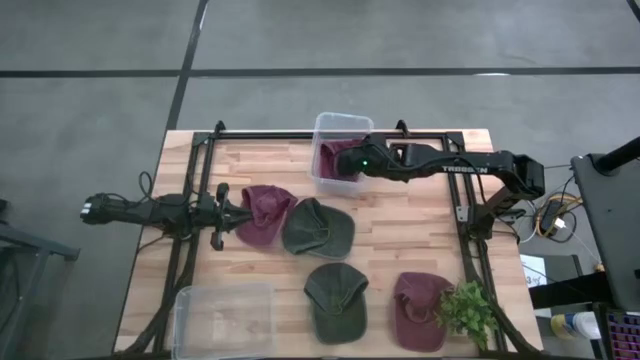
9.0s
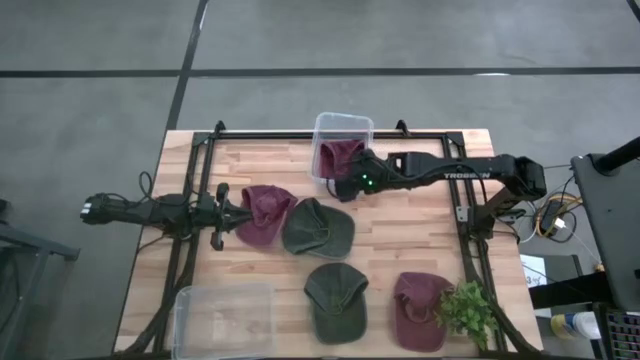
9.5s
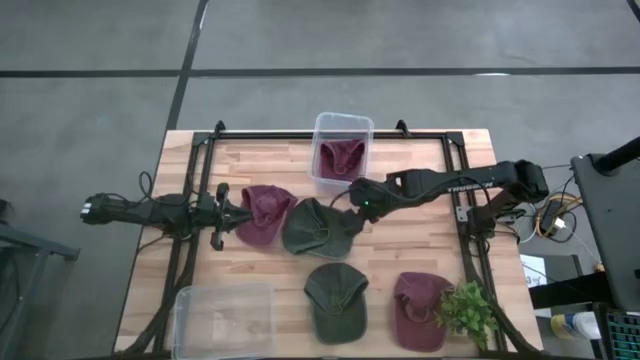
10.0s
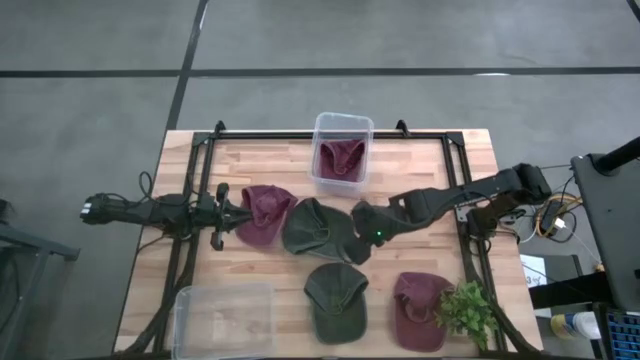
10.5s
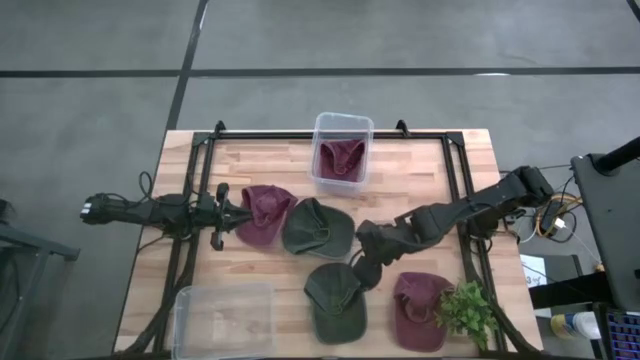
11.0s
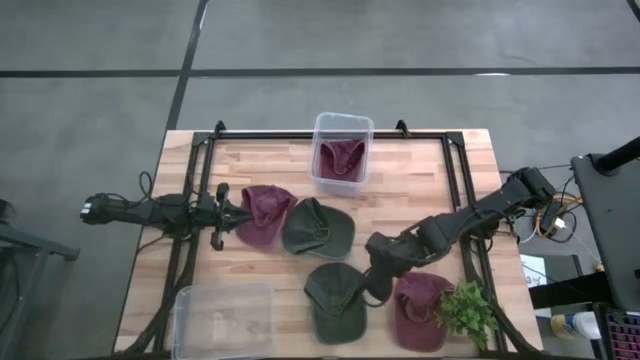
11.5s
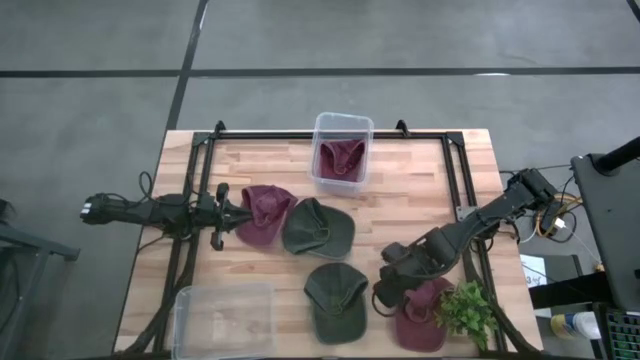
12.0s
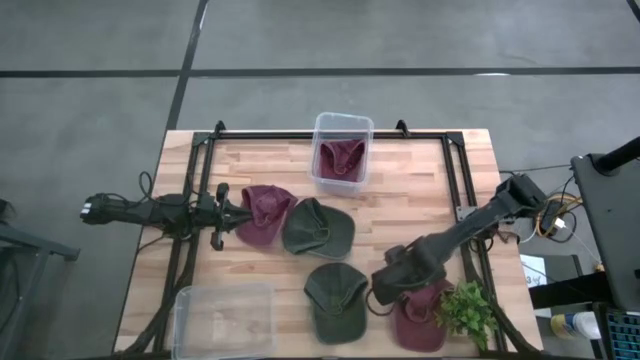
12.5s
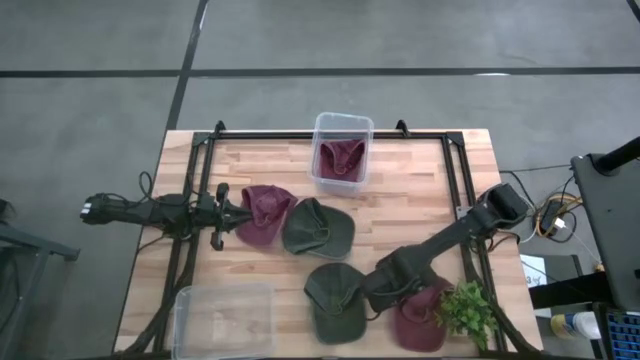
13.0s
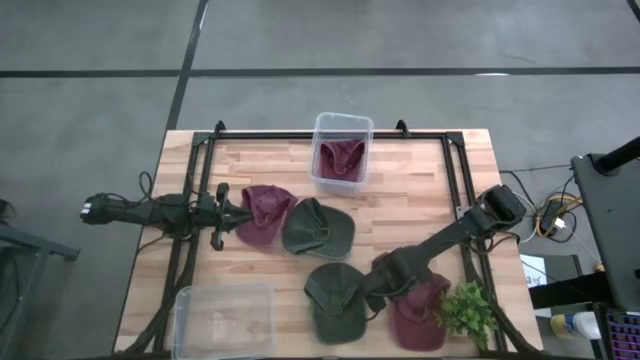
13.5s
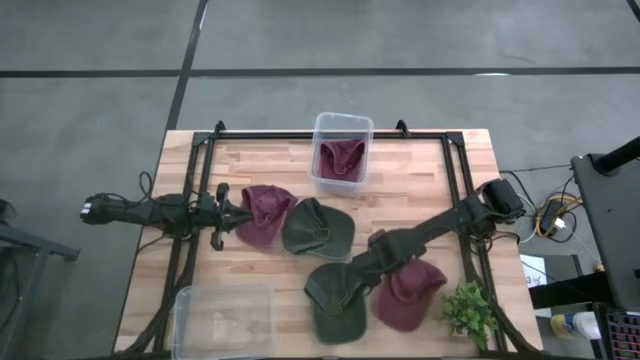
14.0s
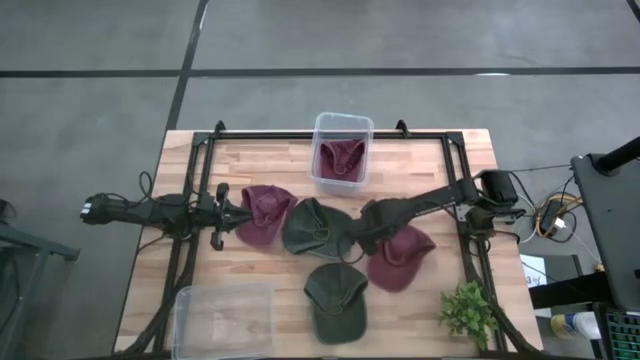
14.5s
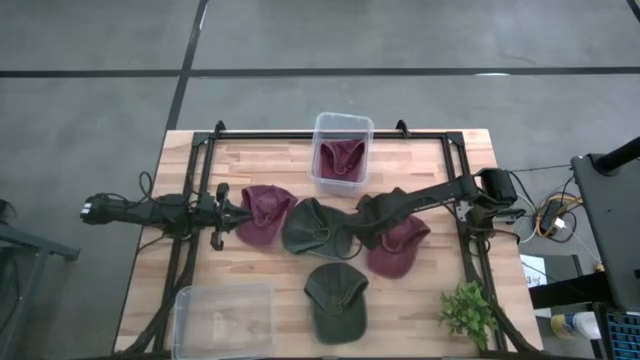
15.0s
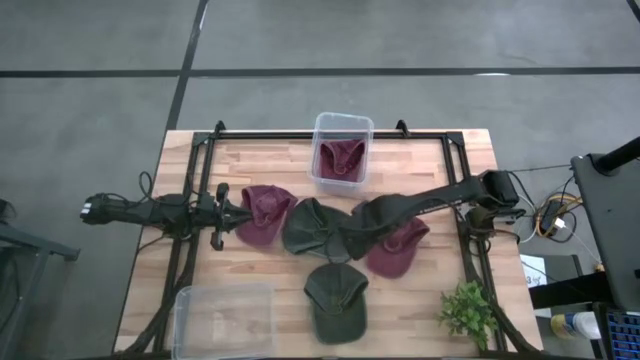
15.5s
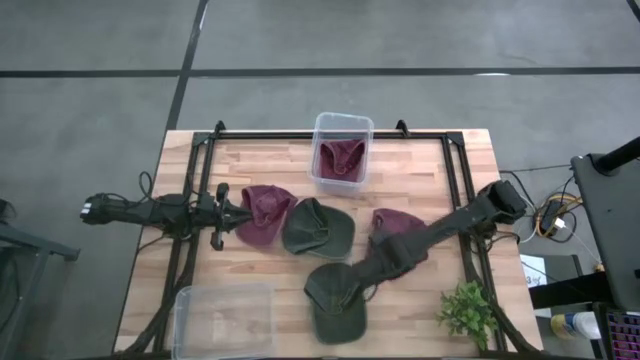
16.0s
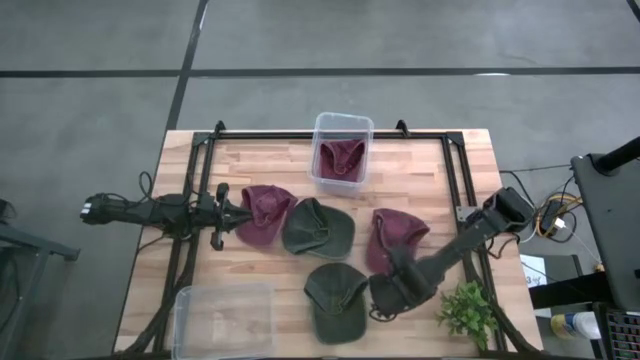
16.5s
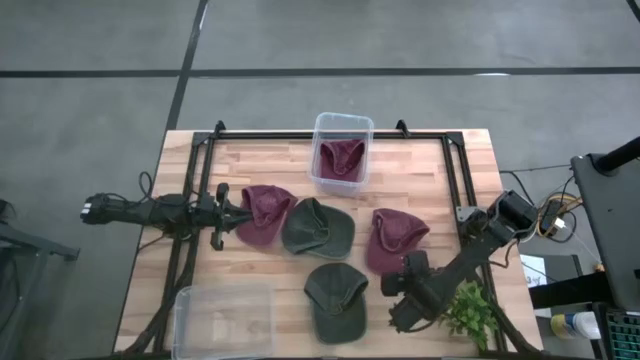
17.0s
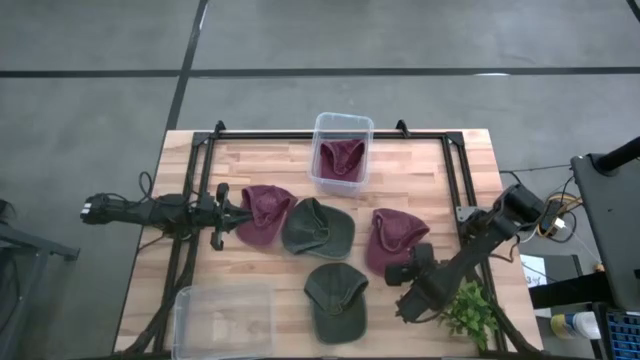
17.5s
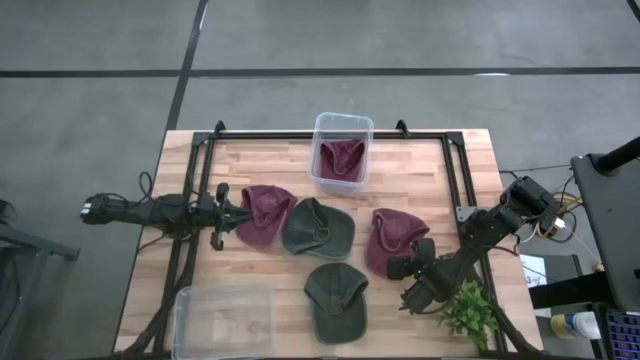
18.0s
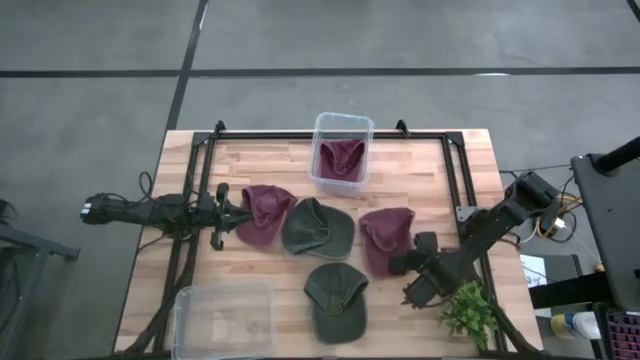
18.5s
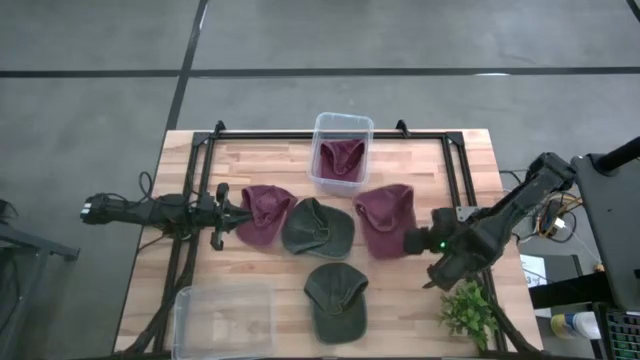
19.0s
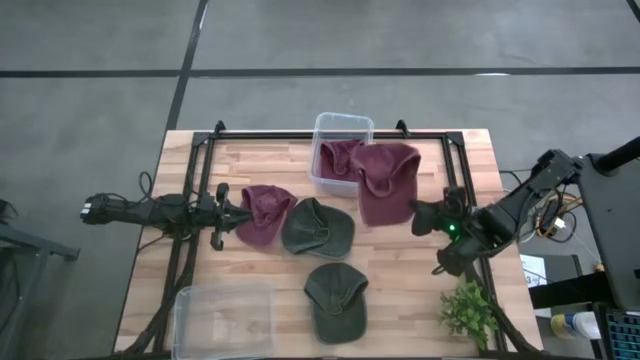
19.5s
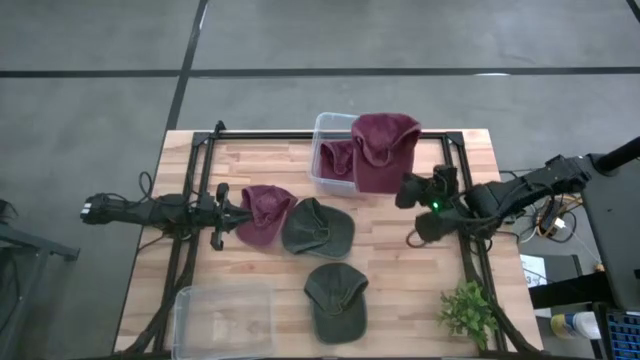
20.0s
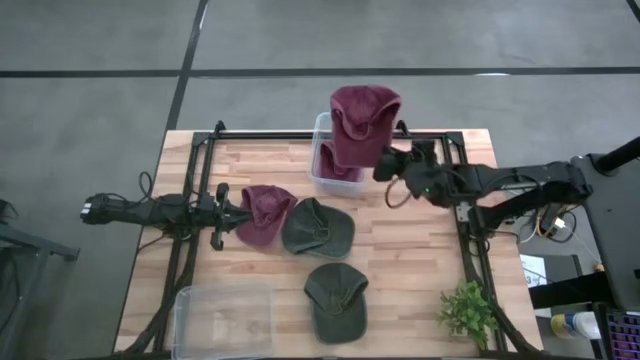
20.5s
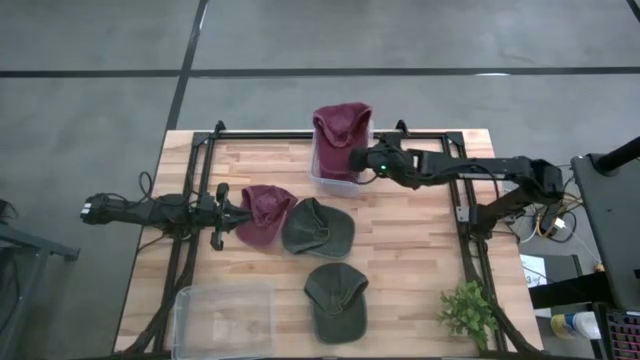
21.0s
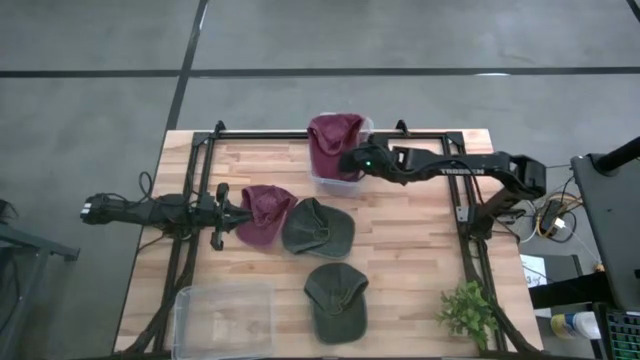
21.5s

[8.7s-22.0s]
Task: Pick & Place hat
Put the bottom red cap into the top transparent bin

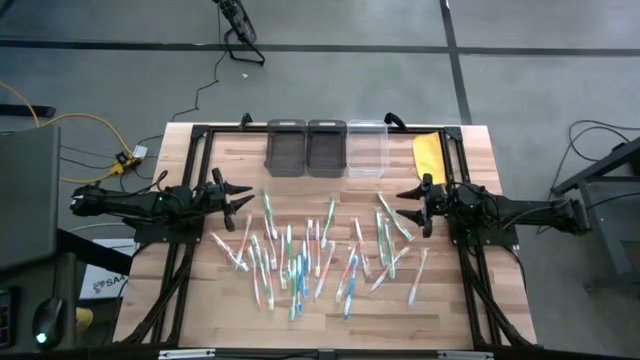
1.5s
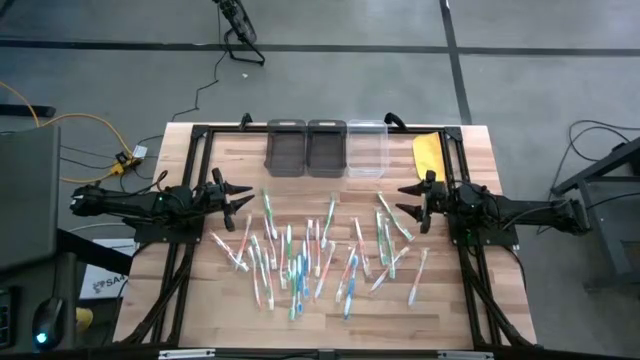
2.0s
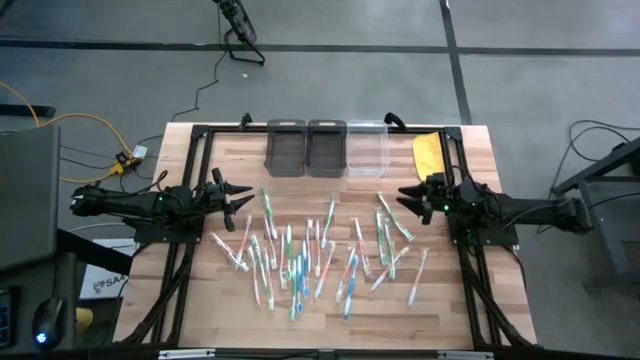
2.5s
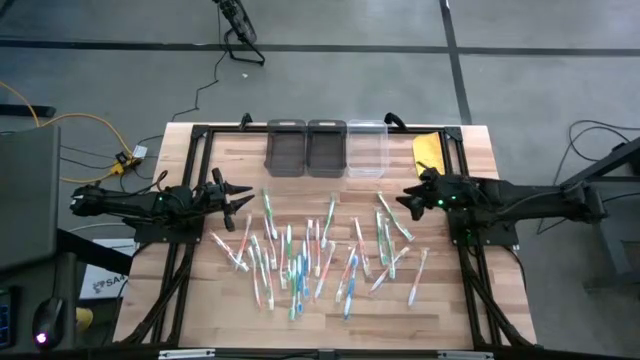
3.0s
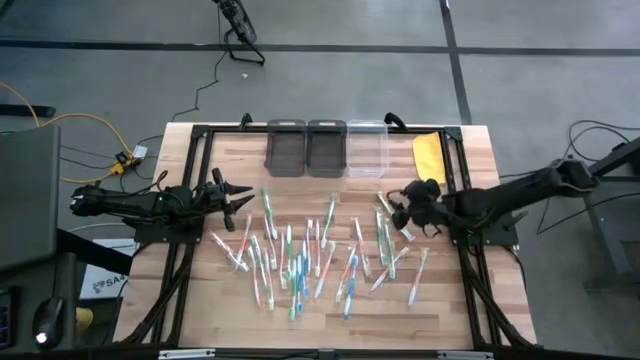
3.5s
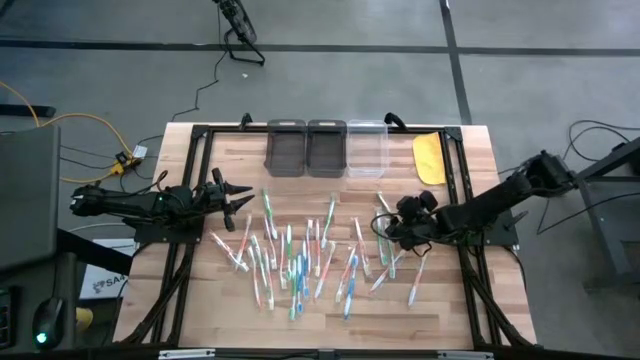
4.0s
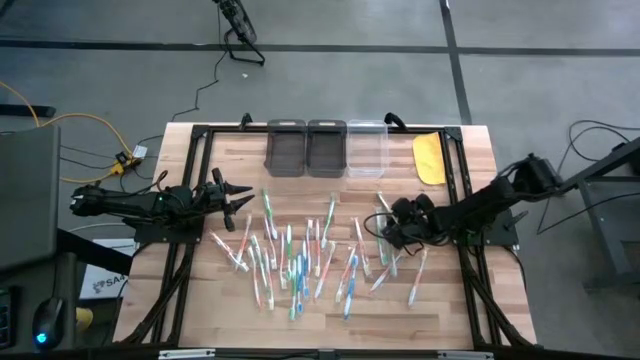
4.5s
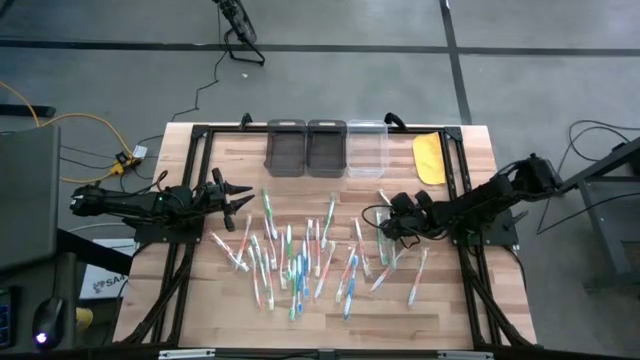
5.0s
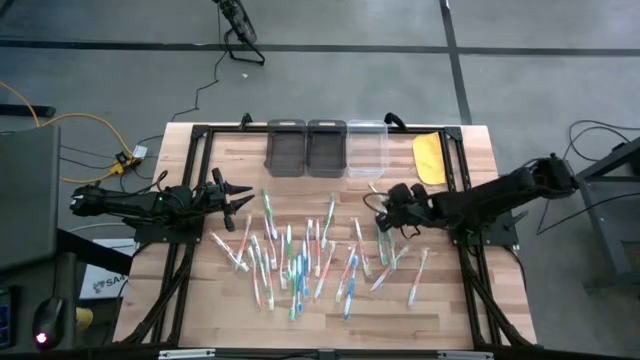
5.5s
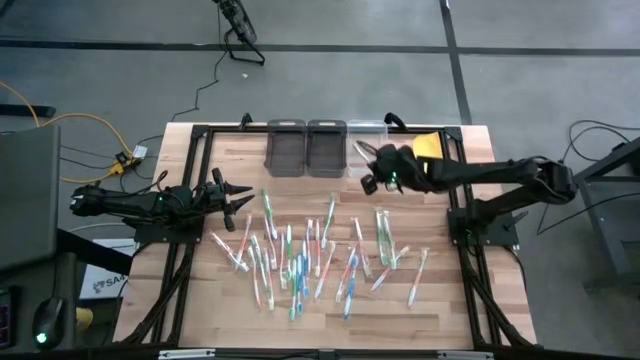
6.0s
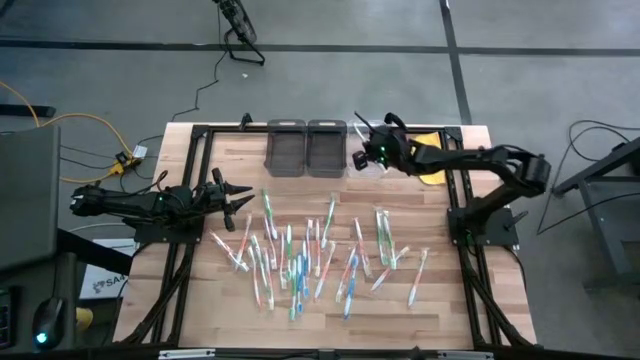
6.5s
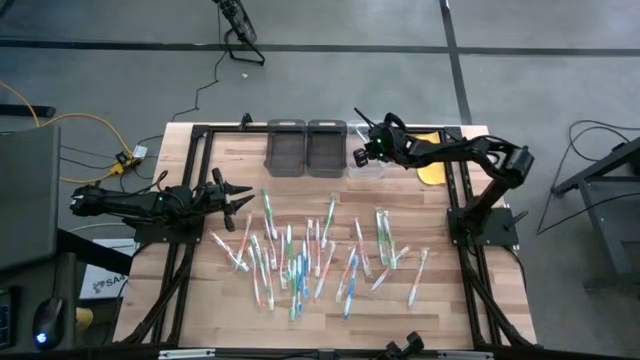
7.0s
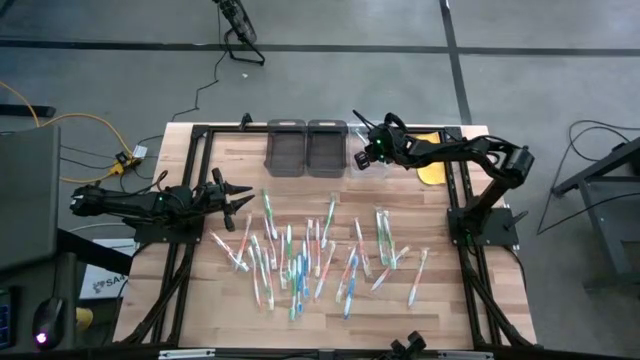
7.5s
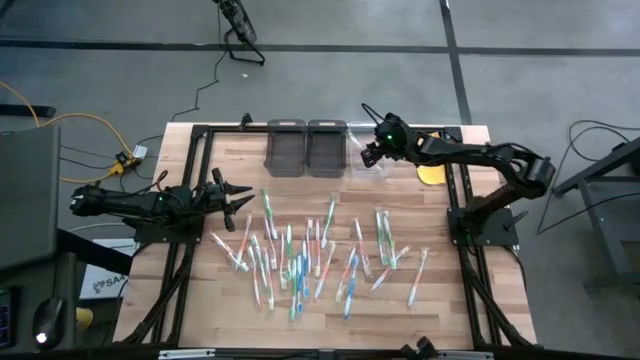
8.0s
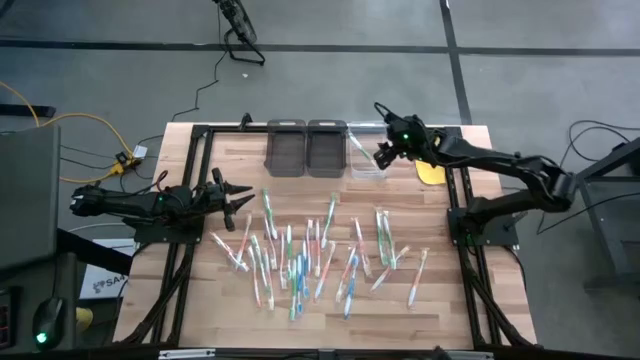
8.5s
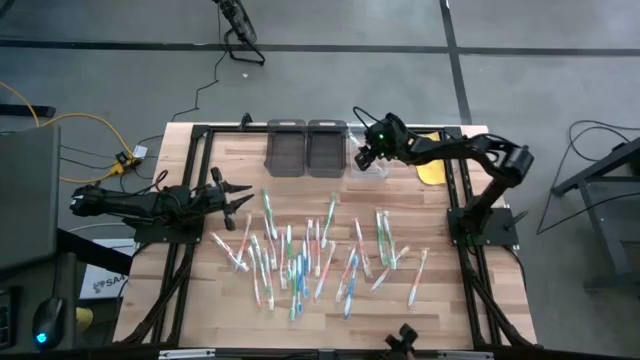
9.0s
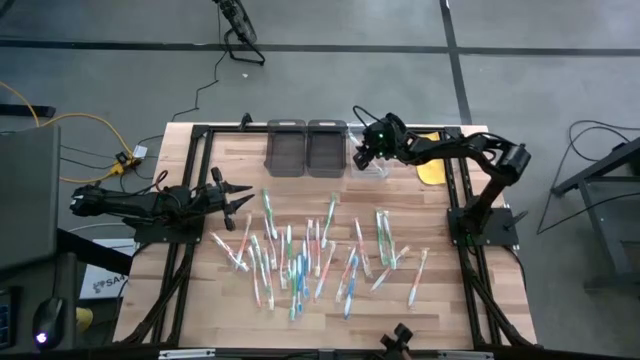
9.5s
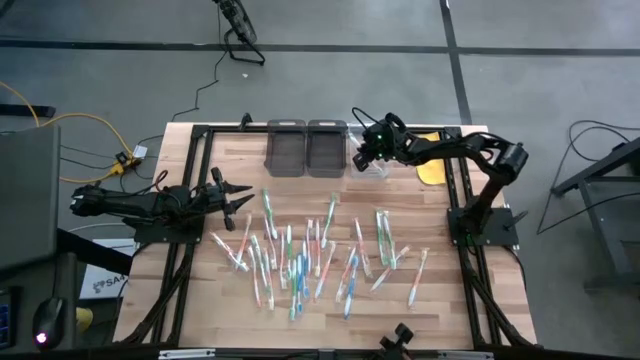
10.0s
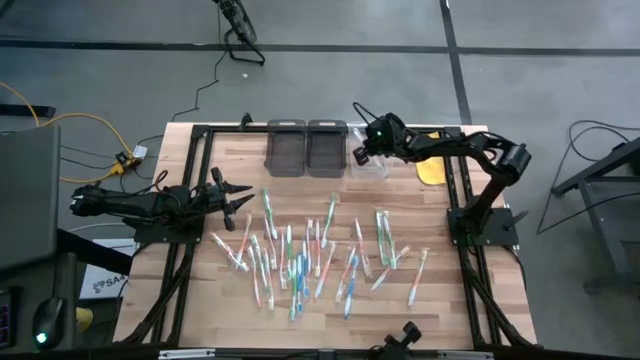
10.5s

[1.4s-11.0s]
Task: Pick & Place Toothbrushes
Put the green toothbrush into the transparent bin
